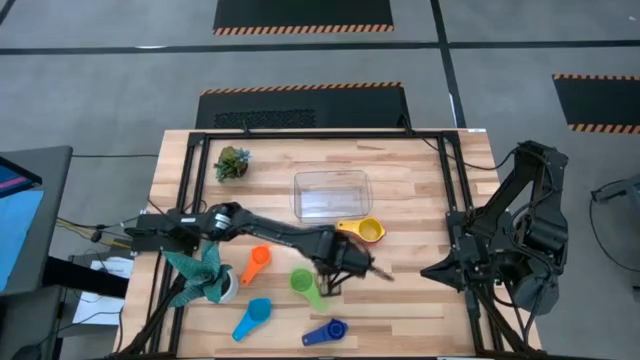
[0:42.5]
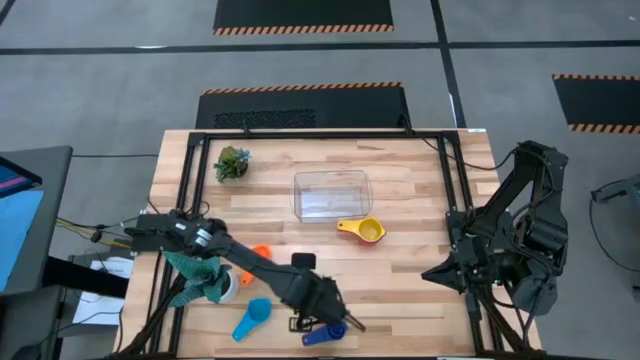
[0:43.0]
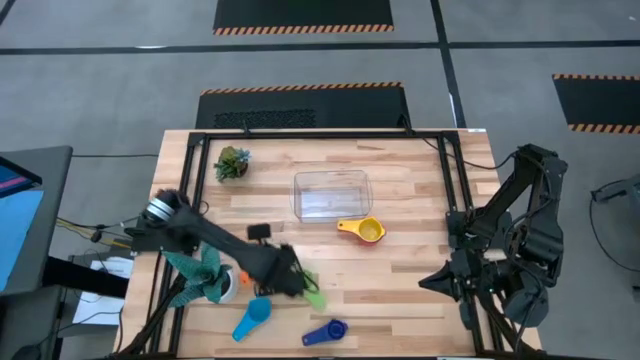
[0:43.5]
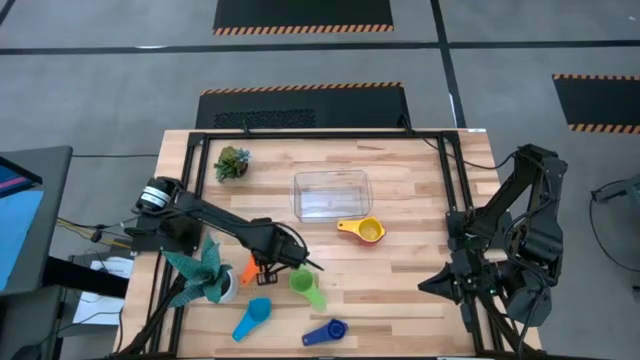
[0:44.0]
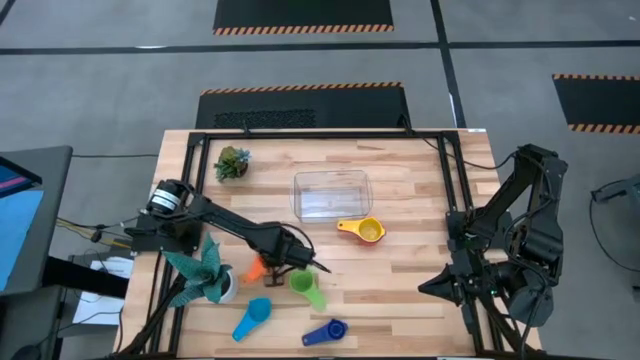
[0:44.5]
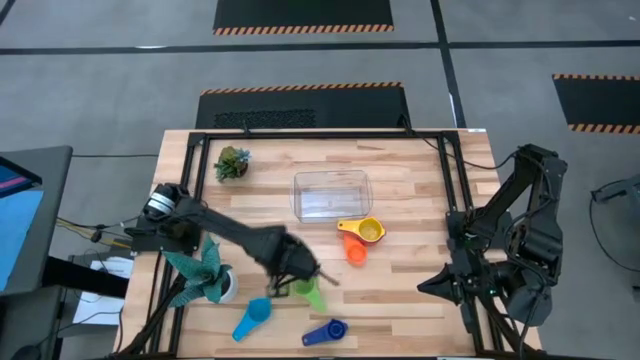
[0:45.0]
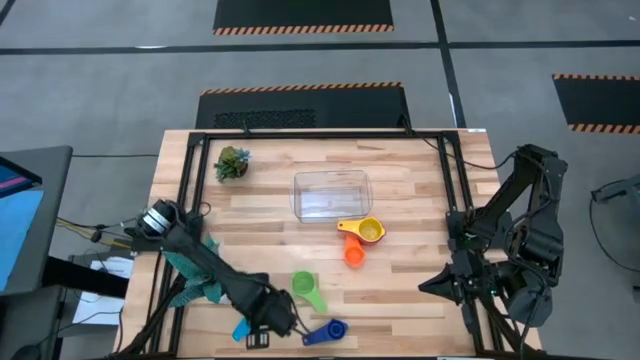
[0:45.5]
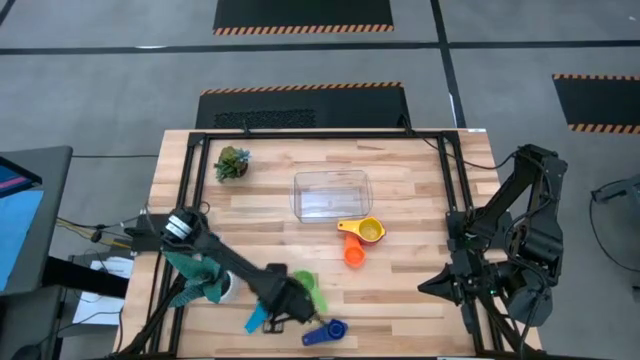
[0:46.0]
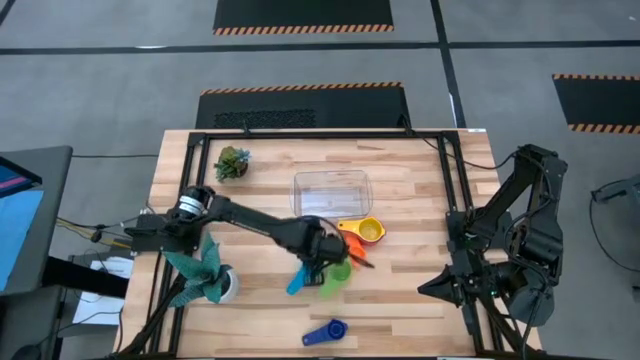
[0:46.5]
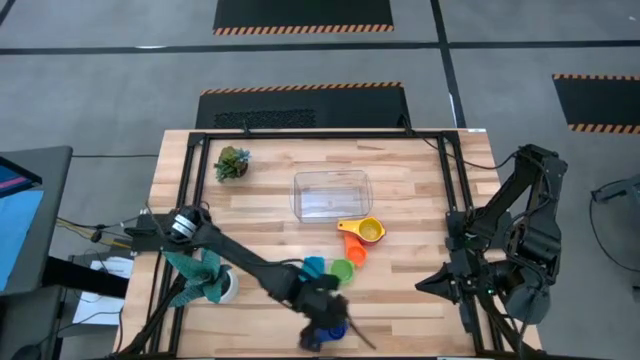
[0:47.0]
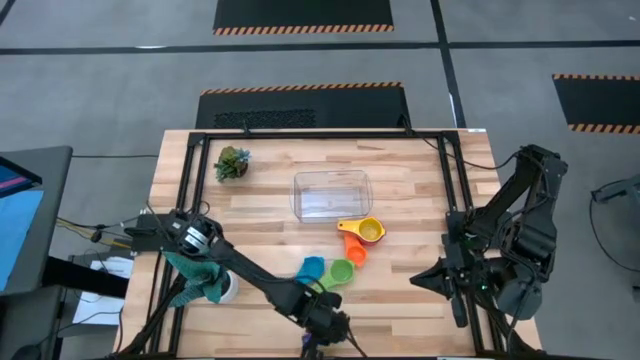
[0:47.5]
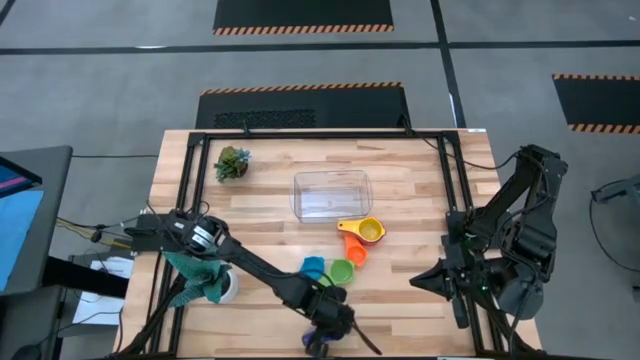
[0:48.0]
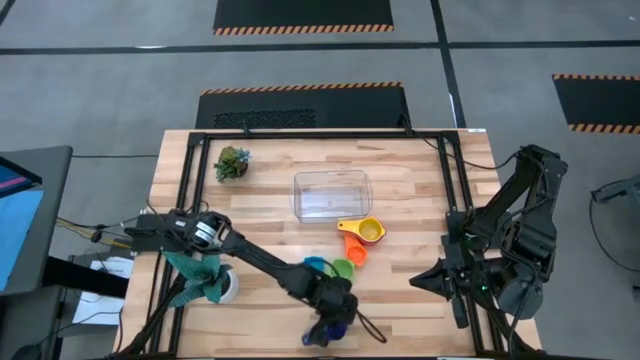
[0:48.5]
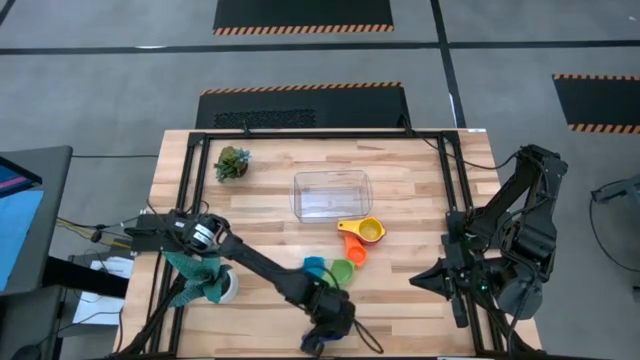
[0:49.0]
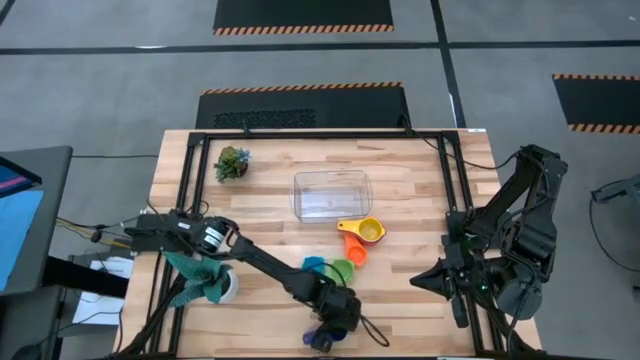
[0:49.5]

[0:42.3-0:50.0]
Task: Nest measuring cups in basket
Adjust the measuring cup on table

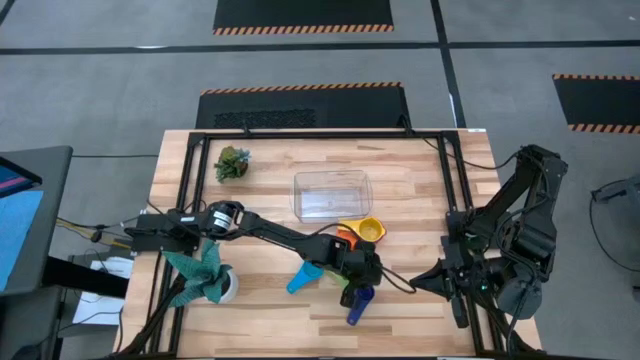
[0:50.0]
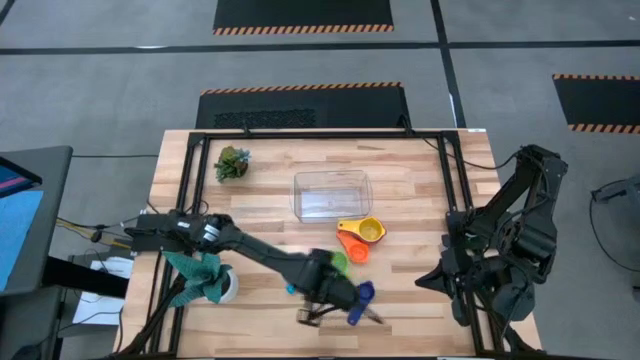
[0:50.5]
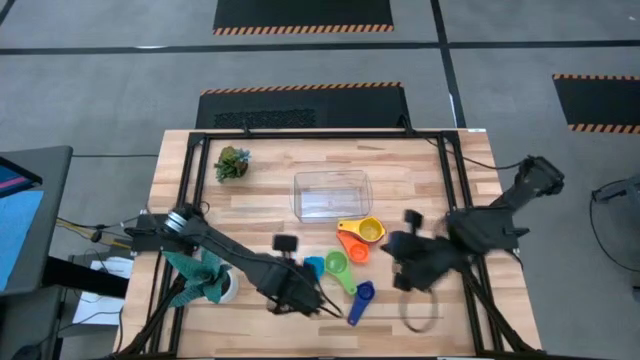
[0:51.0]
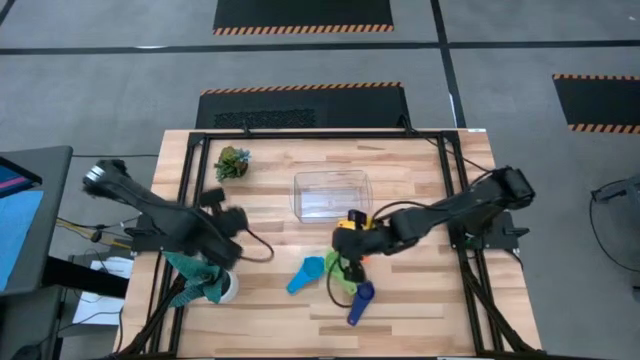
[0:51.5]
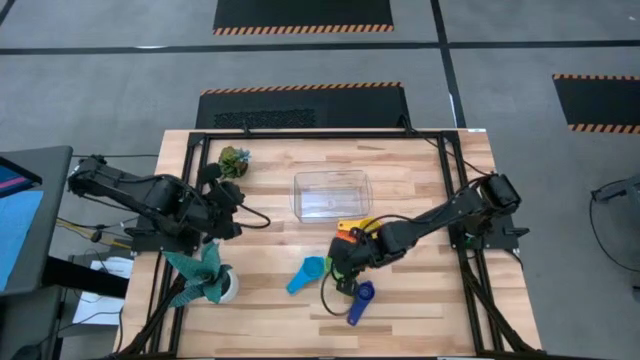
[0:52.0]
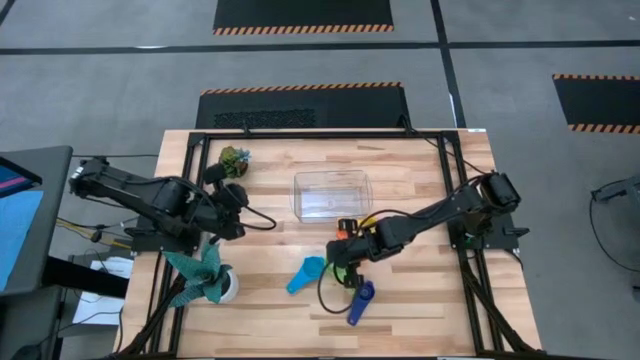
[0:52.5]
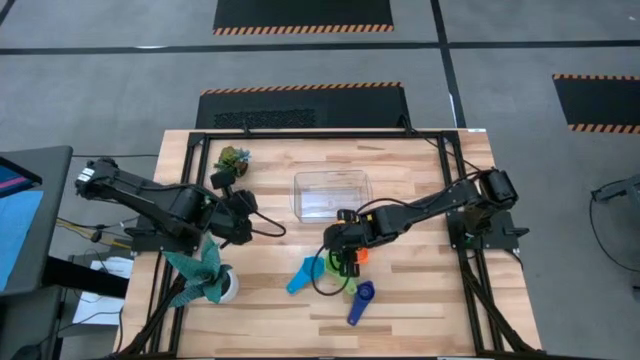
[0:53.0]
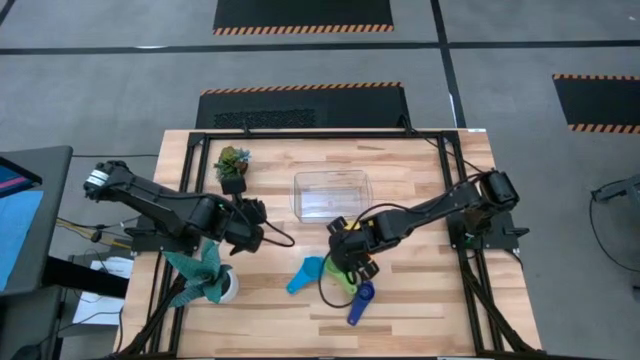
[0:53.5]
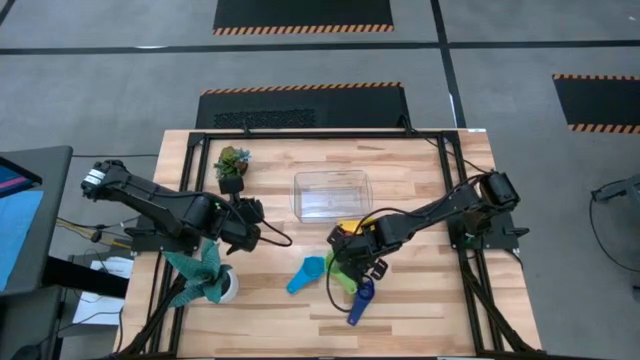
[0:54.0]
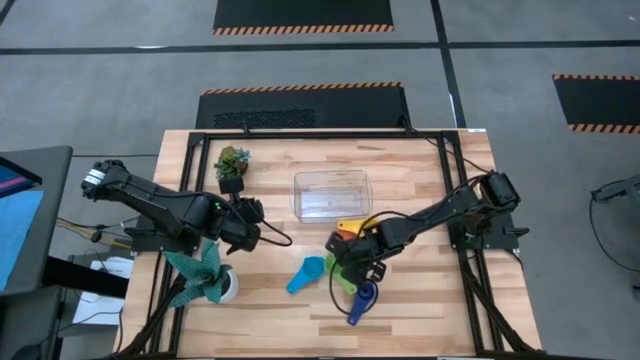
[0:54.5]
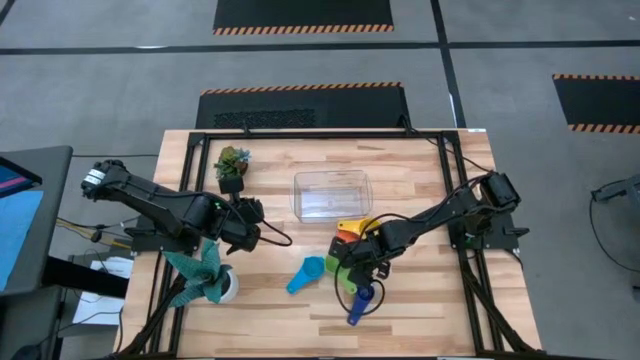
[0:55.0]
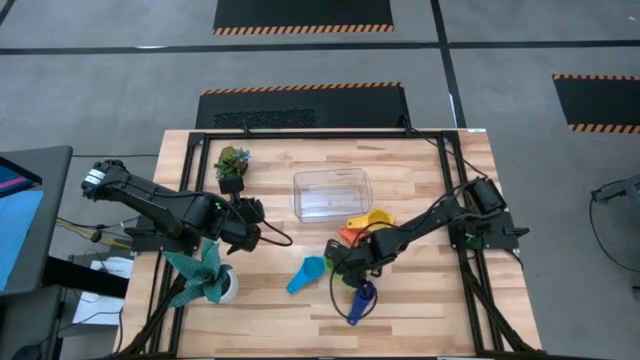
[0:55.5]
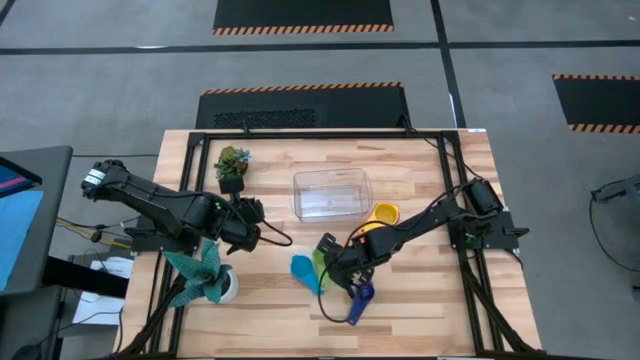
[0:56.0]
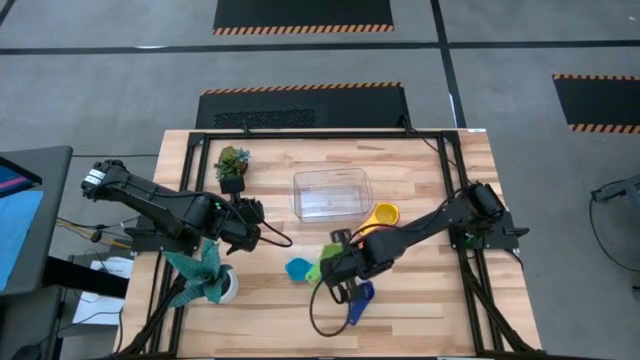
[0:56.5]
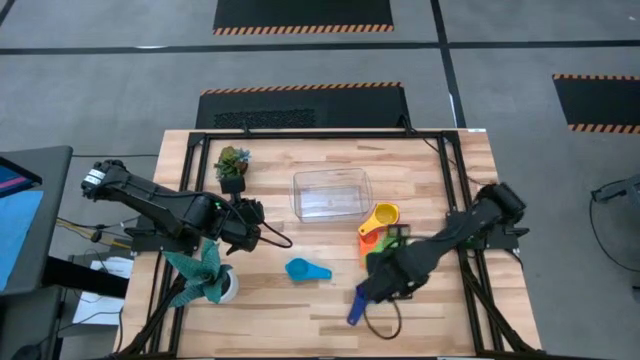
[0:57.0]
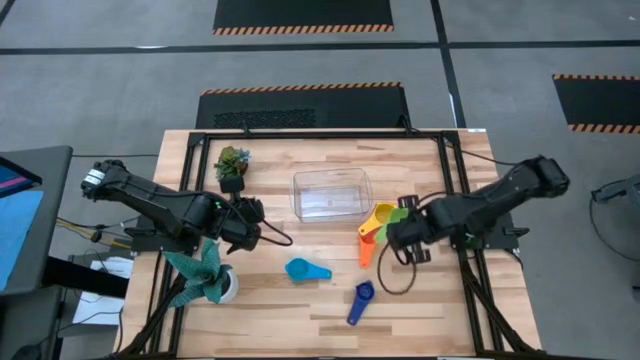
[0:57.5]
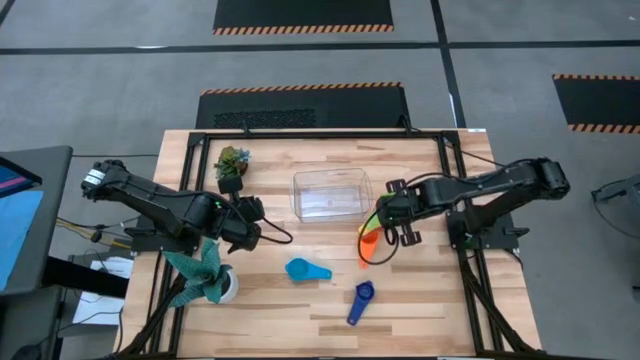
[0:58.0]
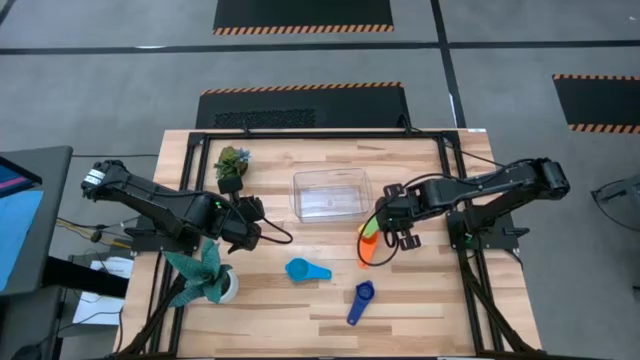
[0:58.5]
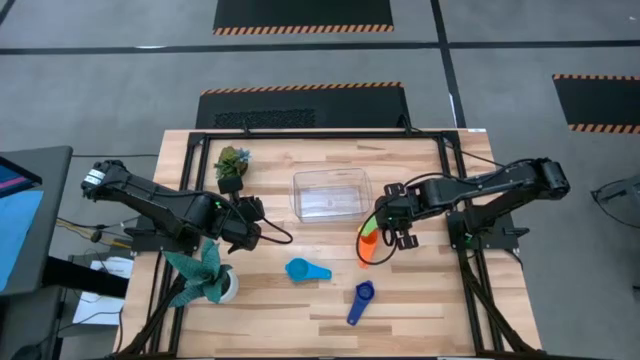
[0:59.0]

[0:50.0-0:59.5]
Stack the green measuring cup on top of the blue measuring cup

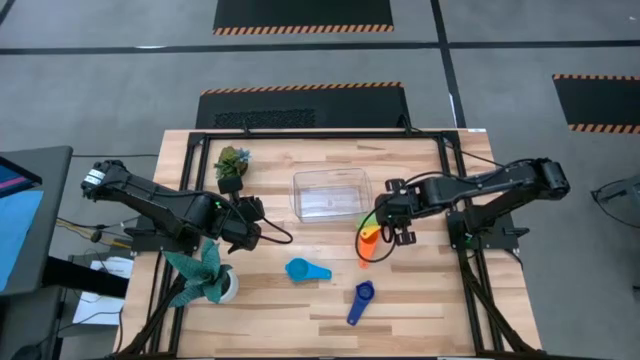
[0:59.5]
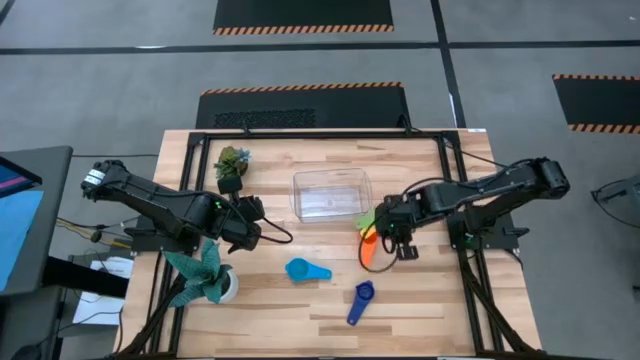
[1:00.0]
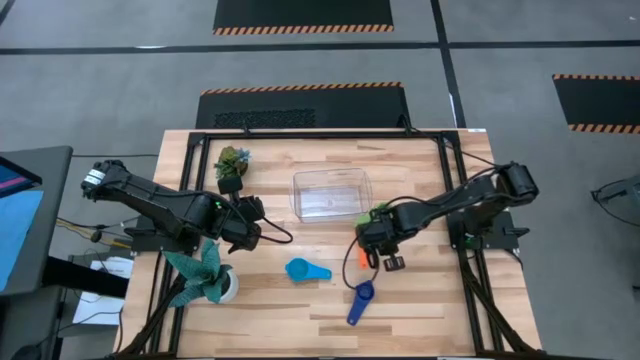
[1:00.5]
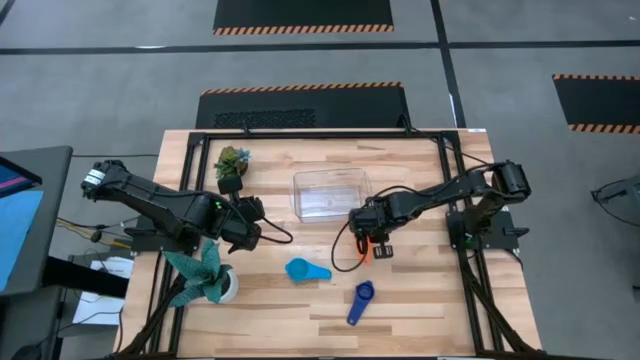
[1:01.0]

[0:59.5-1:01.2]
Adjust the measuring cups on the table
